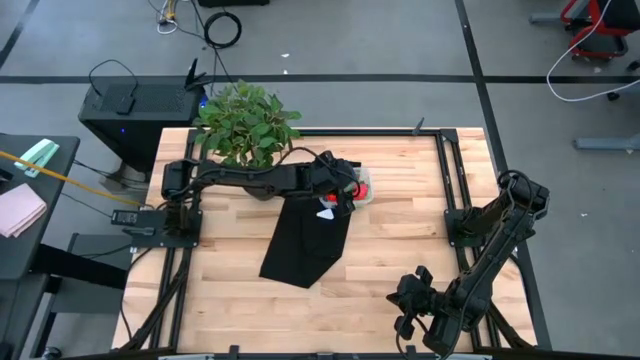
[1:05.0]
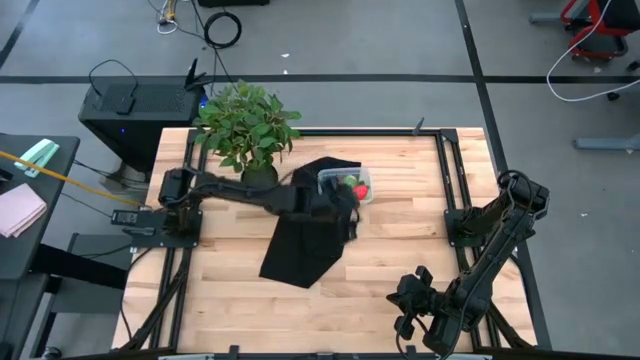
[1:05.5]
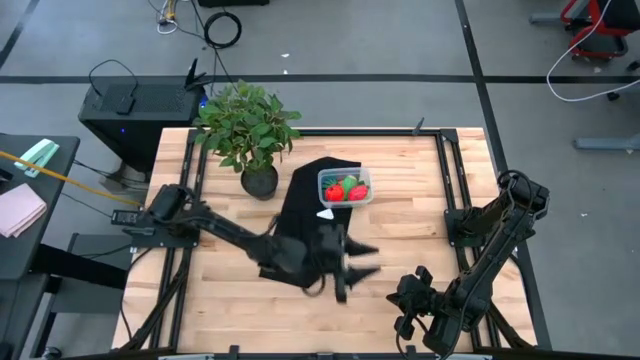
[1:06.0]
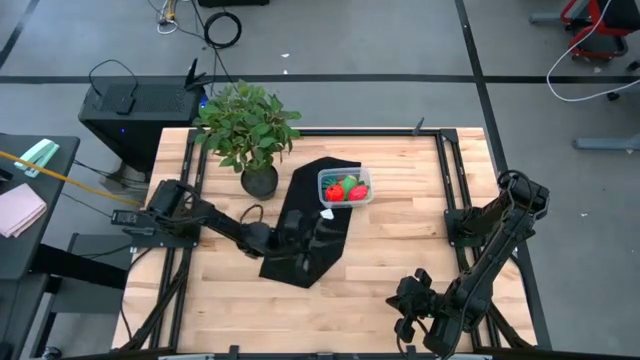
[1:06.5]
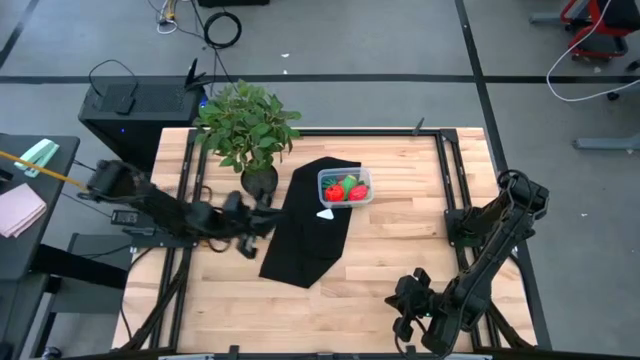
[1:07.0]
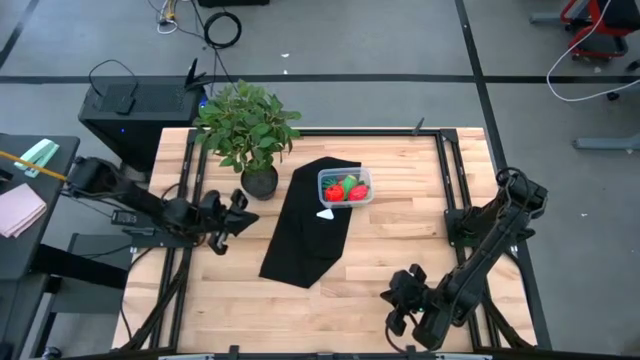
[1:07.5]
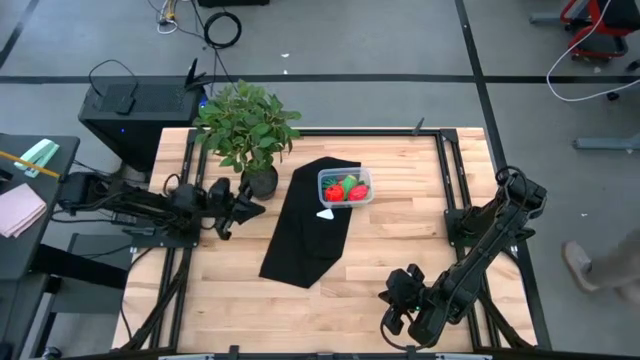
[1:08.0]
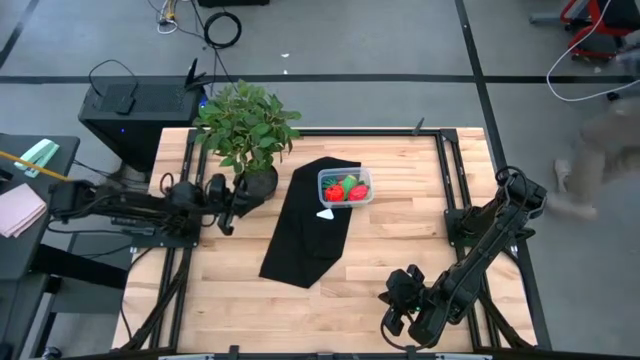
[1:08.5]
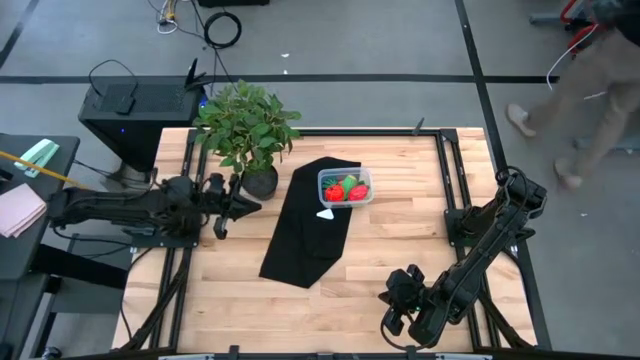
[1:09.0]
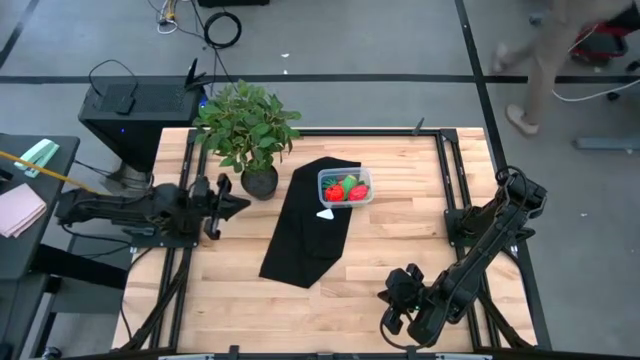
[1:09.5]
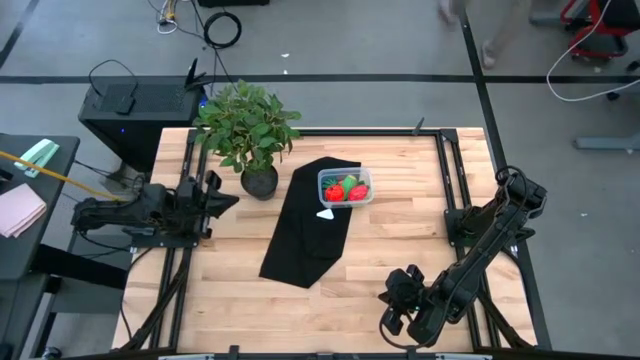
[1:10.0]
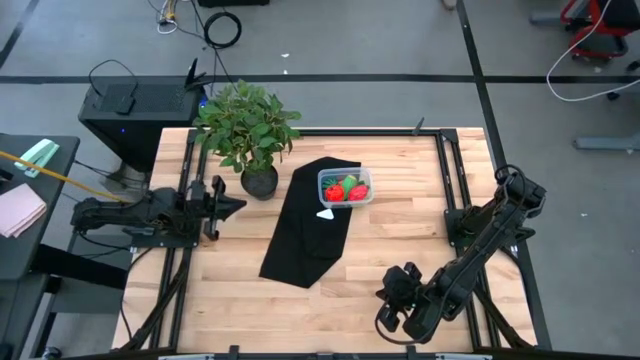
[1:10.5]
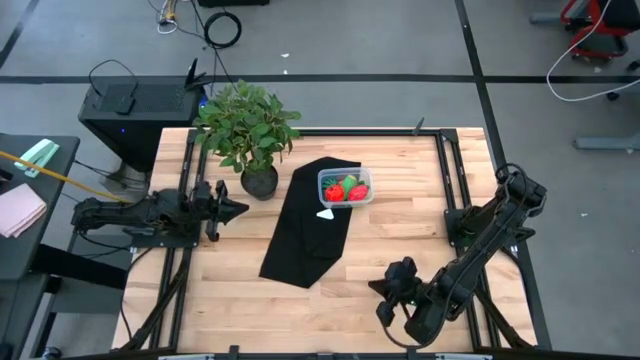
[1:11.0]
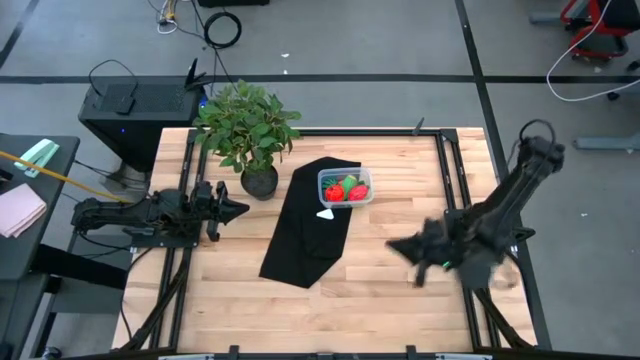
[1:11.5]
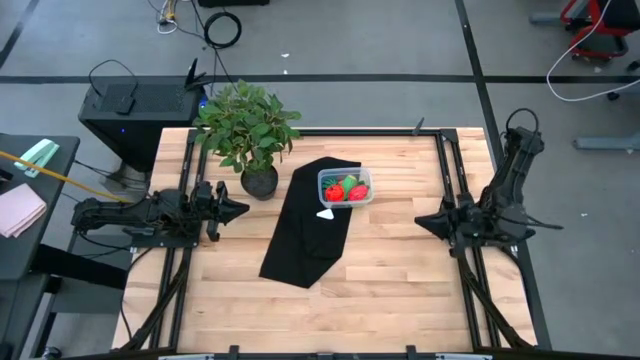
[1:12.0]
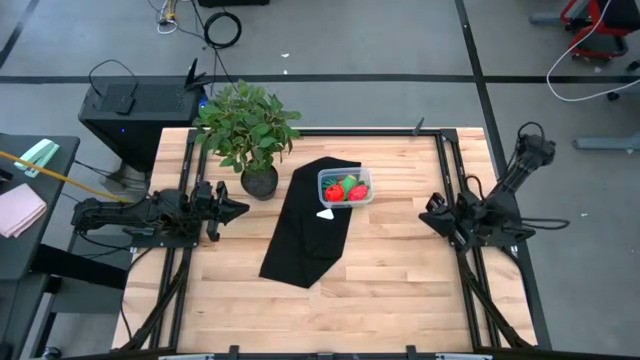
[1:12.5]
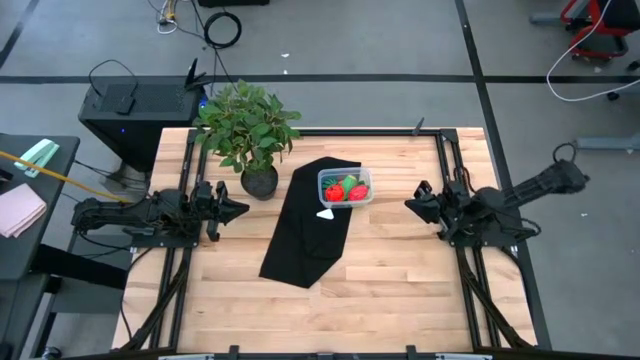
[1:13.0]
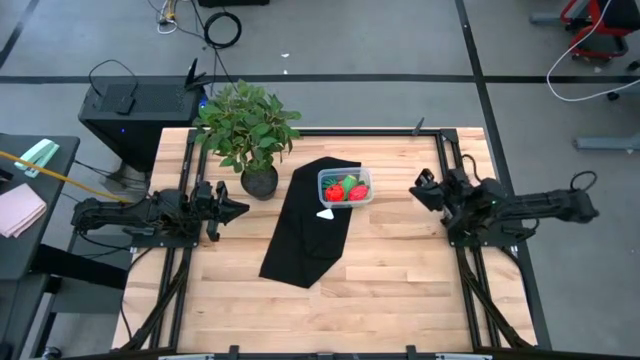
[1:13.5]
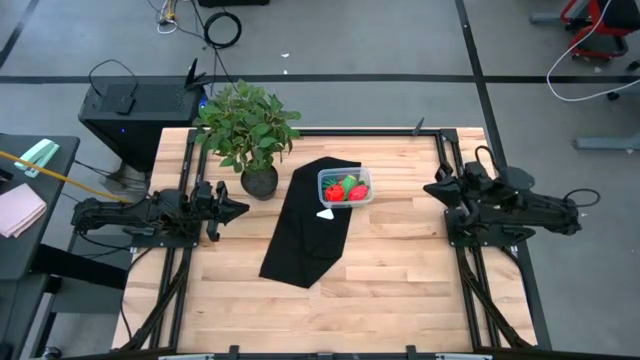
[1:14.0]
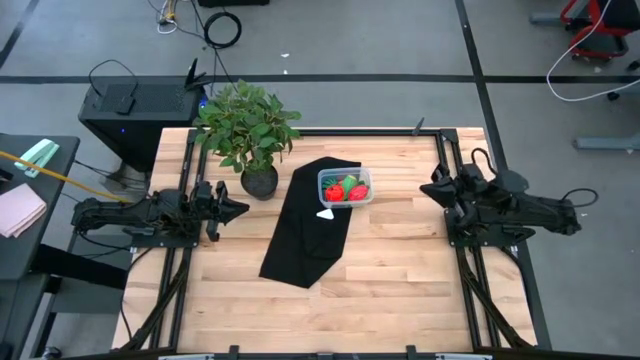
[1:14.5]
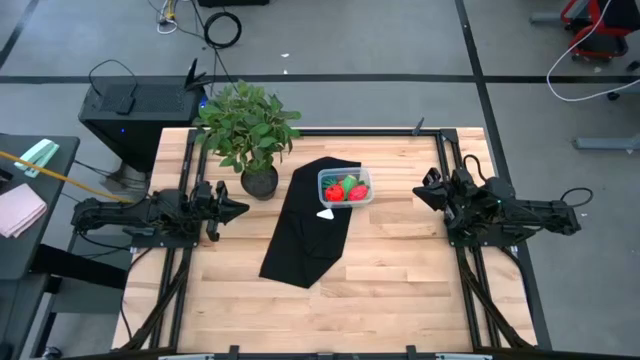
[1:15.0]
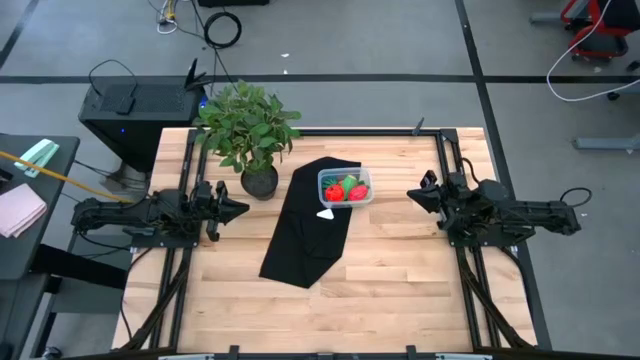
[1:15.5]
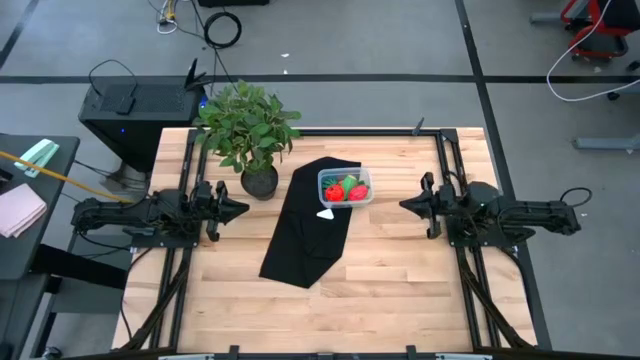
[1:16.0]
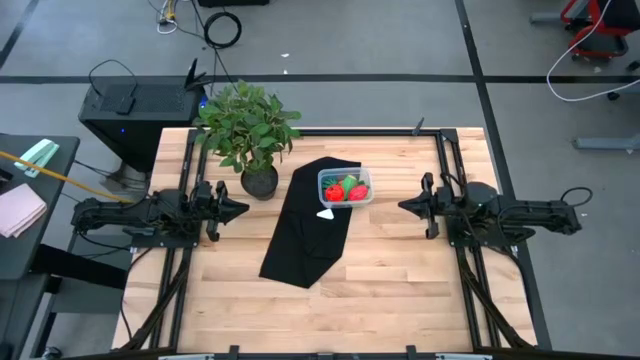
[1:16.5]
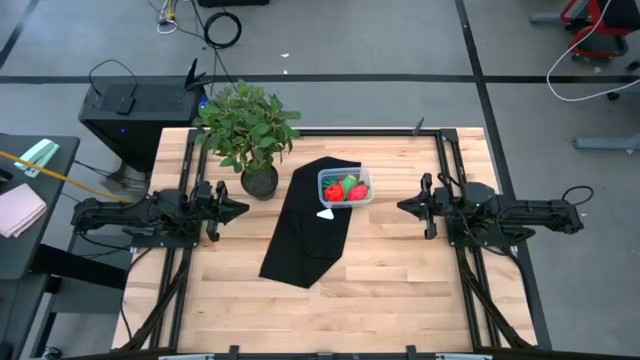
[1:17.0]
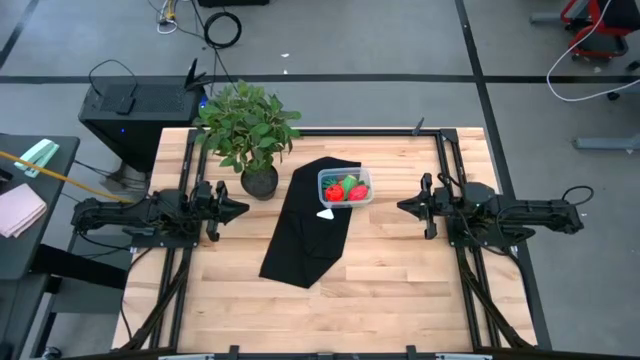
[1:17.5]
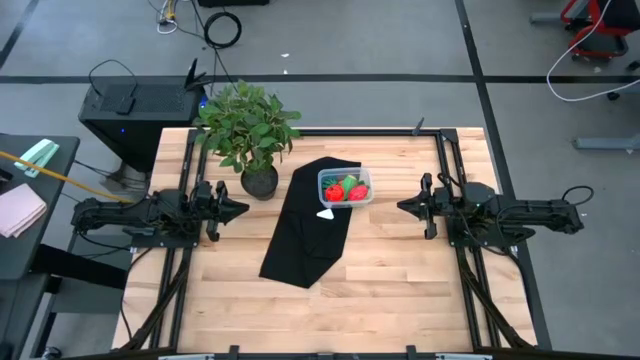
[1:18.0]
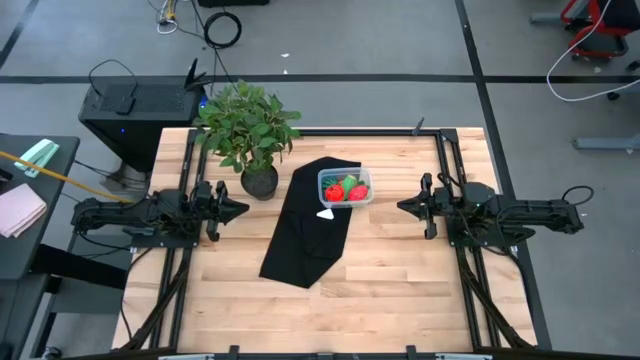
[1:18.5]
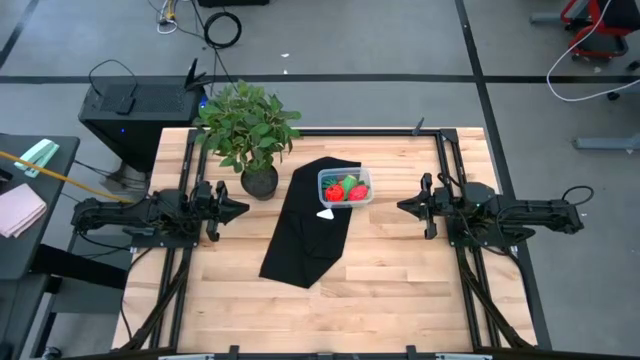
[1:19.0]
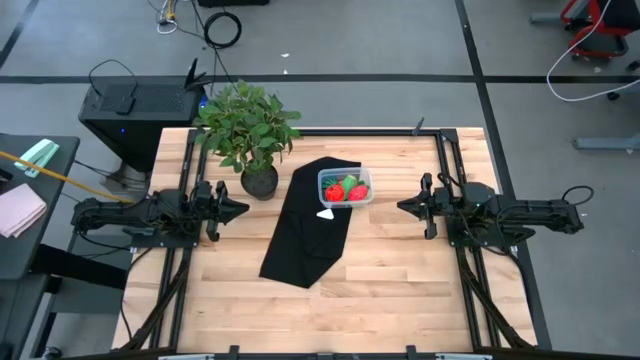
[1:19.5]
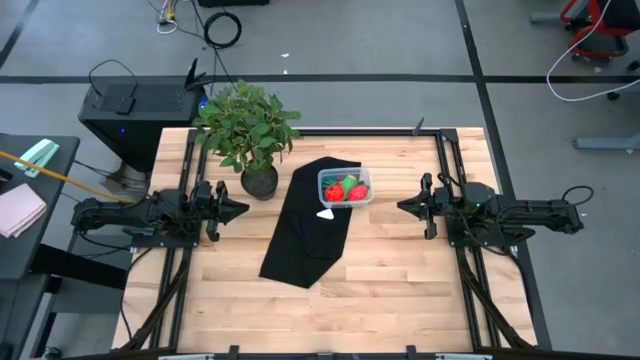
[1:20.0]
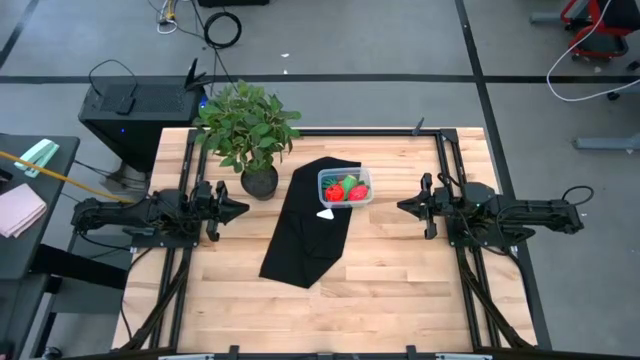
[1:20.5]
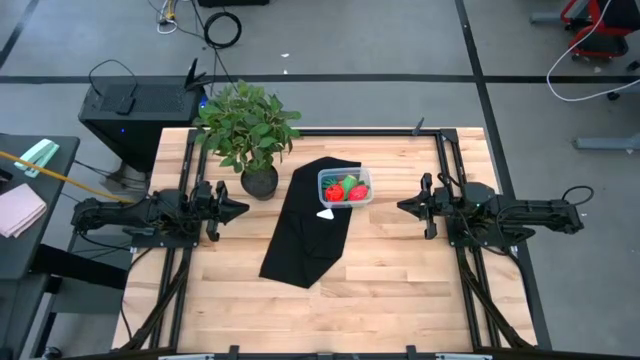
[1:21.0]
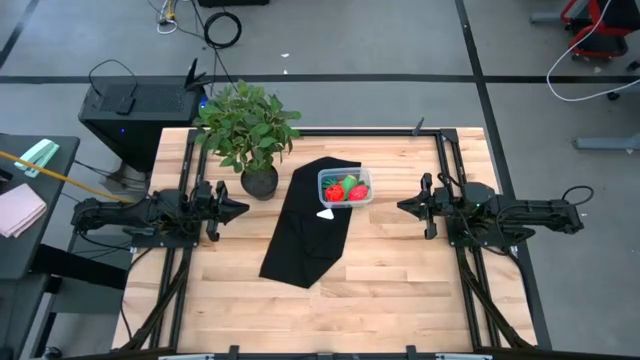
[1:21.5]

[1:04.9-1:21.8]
Task: Pick and placing Produce into tupperware
Return to Home Position

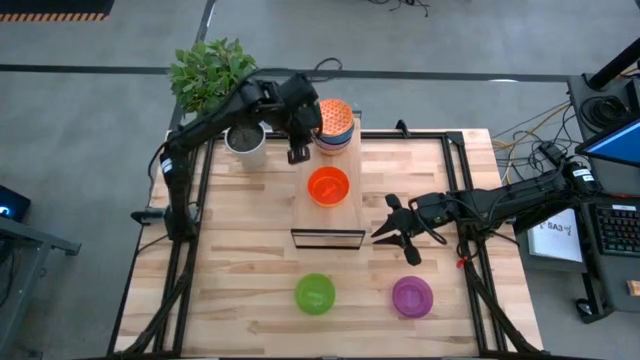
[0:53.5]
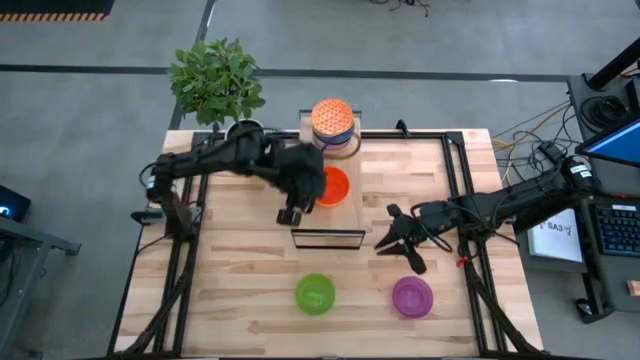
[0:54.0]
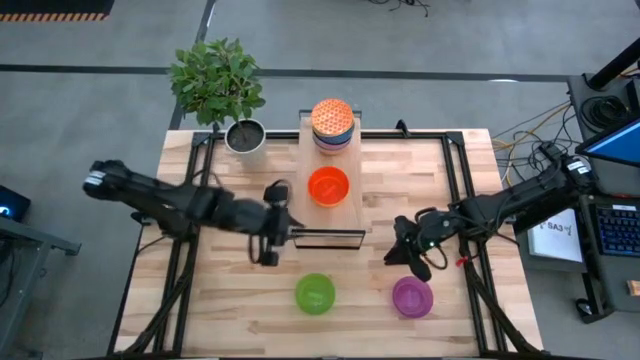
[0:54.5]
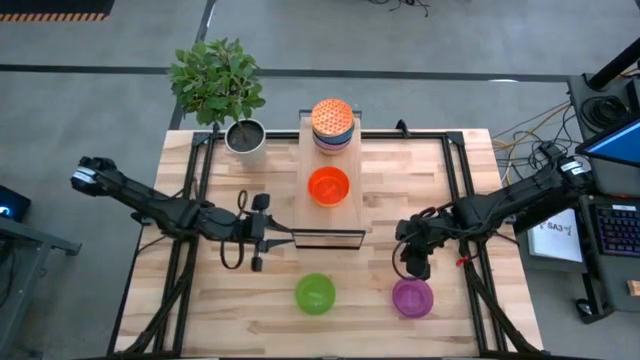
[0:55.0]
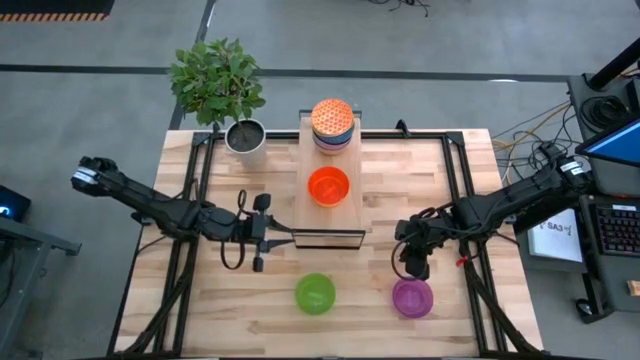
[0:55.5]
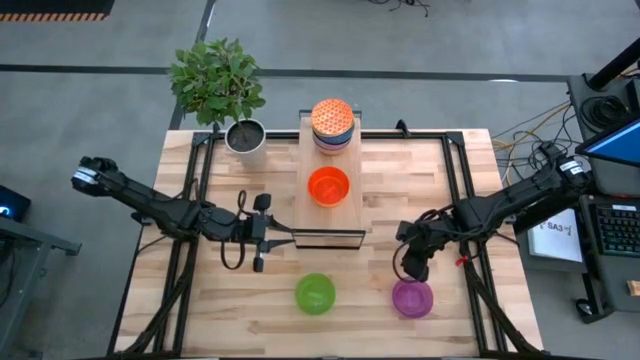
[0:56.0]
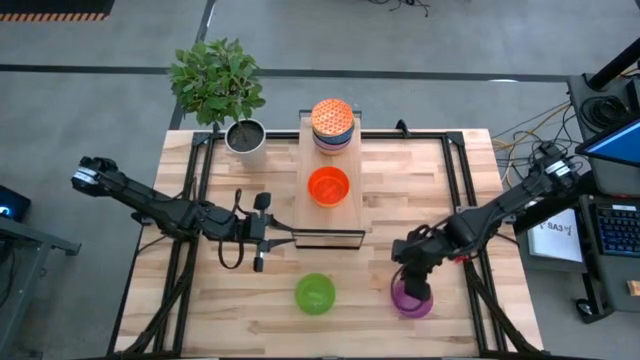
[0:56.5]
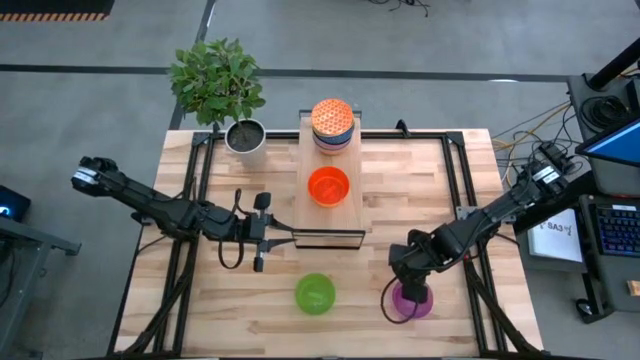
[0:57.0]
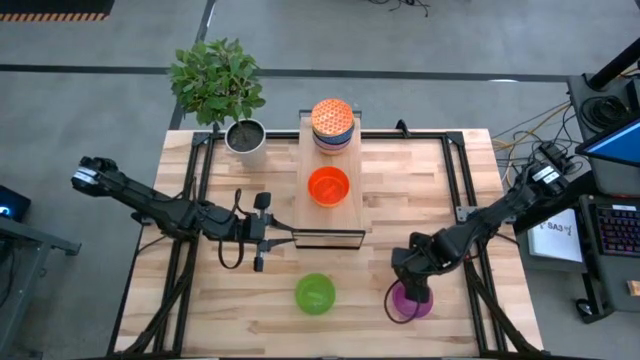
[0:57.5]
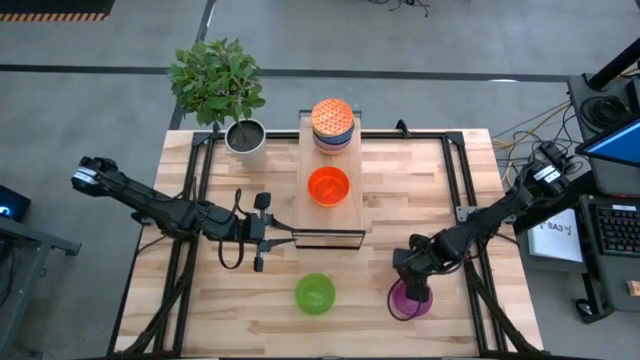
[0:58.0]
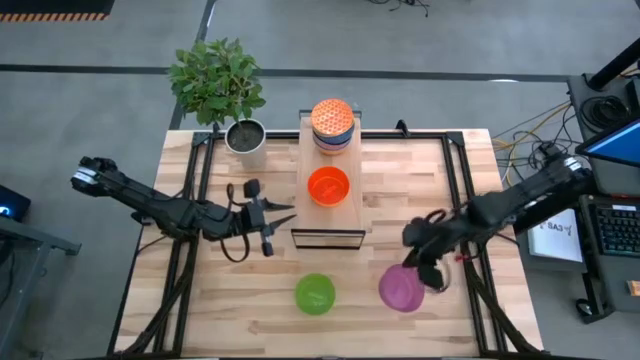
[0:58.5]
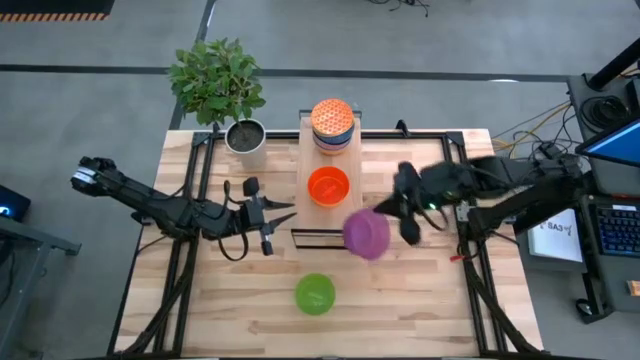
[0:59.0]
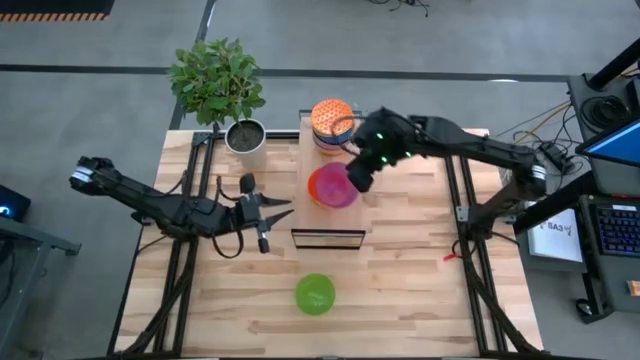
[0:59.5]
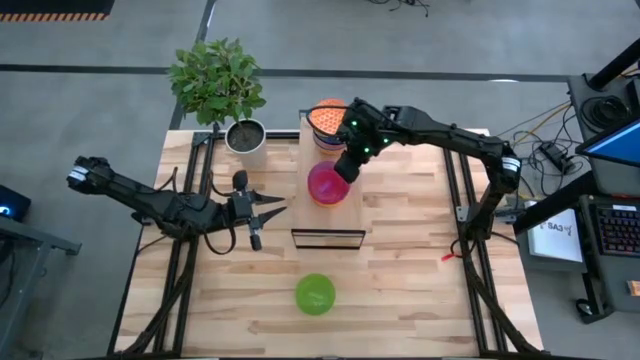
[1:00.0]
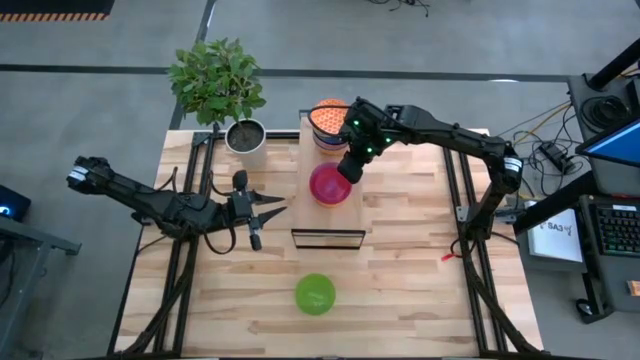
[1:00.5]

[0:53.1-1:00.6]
Task: Place and stack bowls onto a shelf
Stack the violet bowl on top of the orange bowl on the shelf
